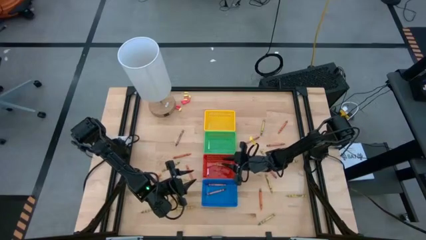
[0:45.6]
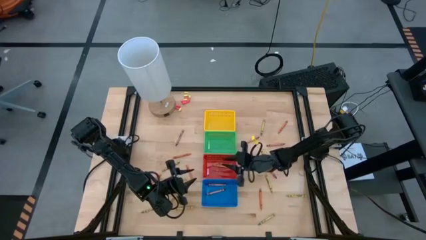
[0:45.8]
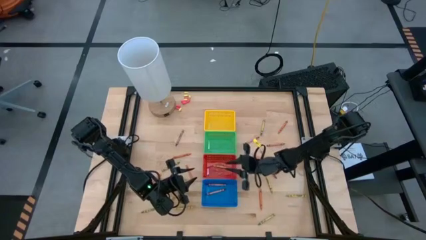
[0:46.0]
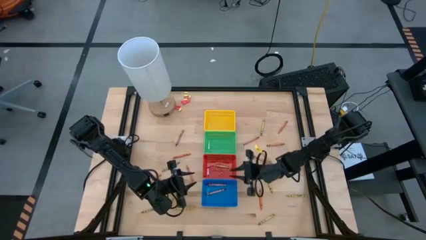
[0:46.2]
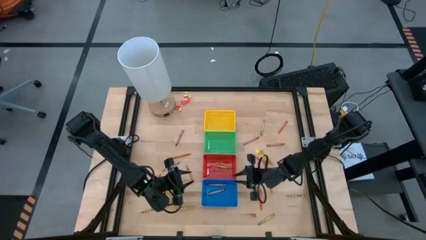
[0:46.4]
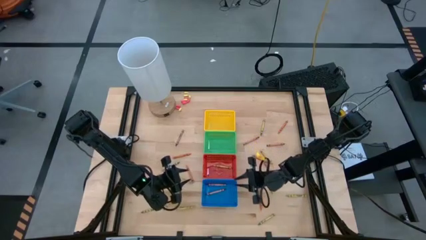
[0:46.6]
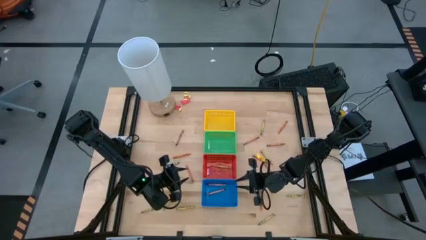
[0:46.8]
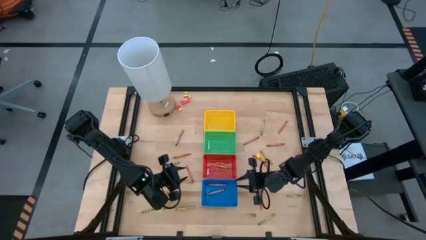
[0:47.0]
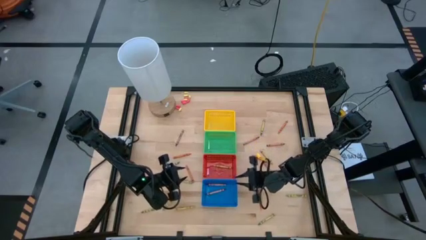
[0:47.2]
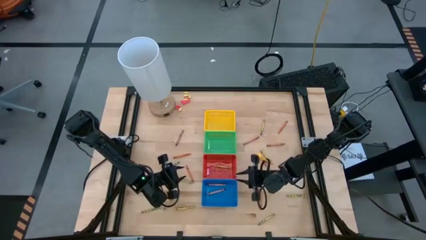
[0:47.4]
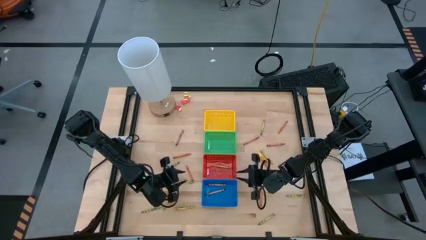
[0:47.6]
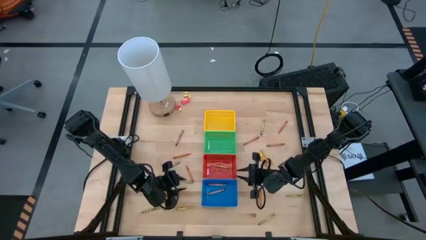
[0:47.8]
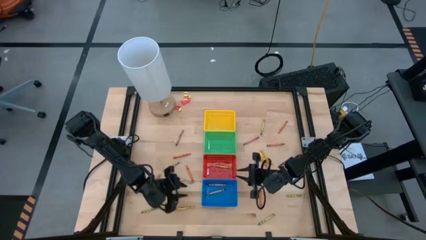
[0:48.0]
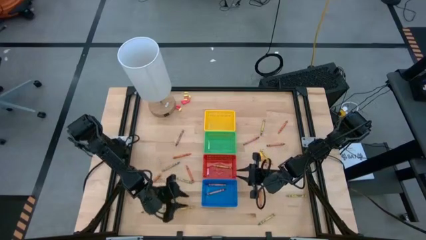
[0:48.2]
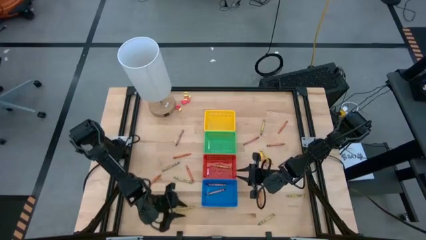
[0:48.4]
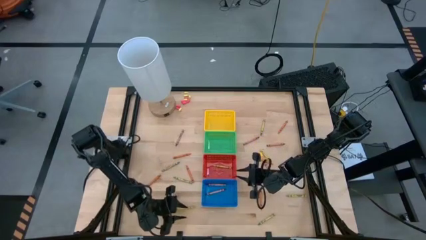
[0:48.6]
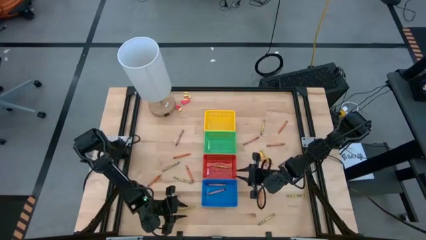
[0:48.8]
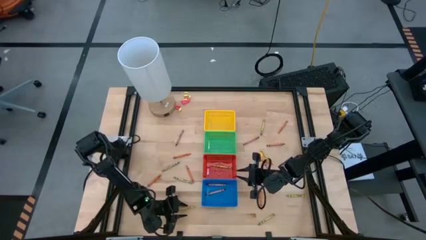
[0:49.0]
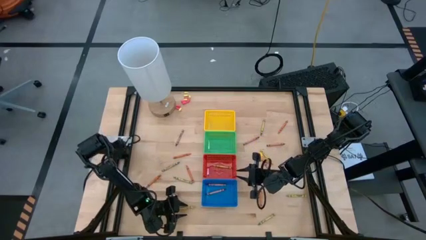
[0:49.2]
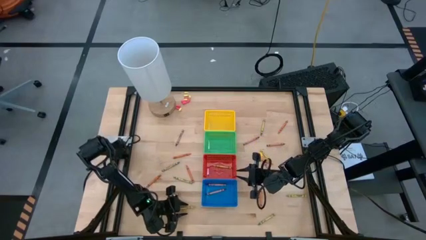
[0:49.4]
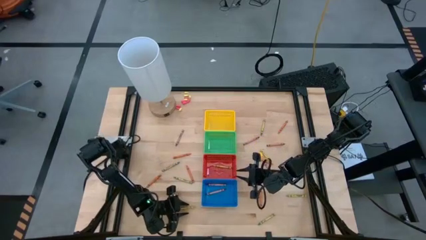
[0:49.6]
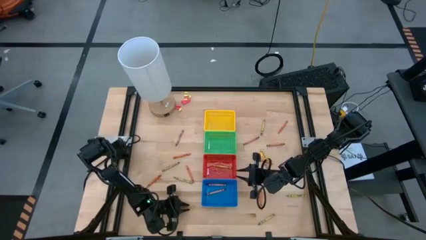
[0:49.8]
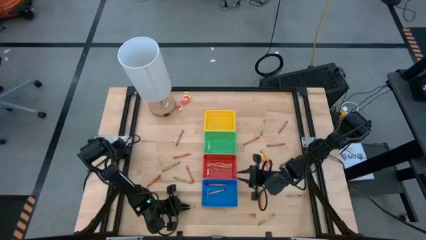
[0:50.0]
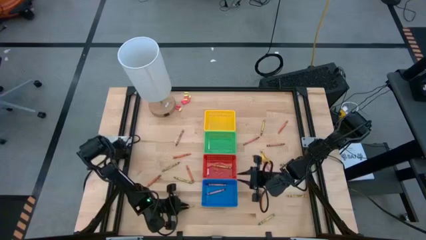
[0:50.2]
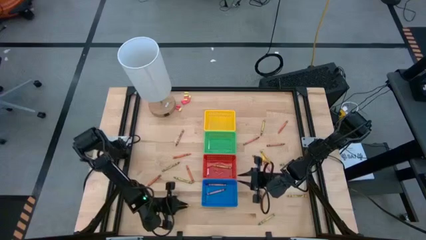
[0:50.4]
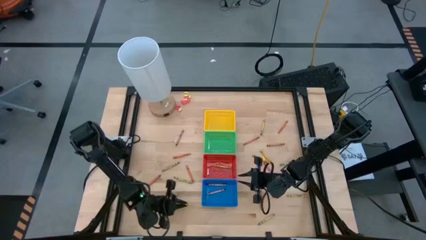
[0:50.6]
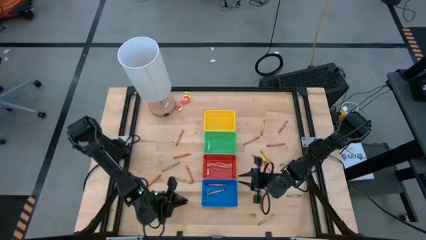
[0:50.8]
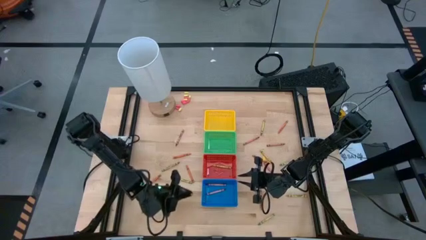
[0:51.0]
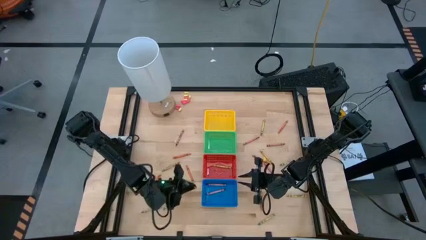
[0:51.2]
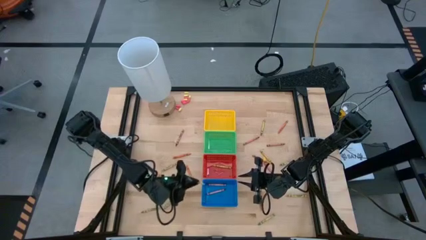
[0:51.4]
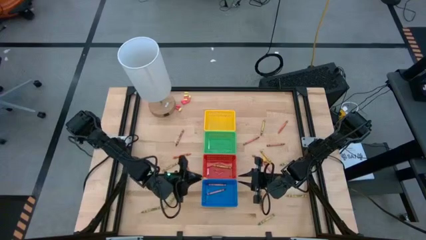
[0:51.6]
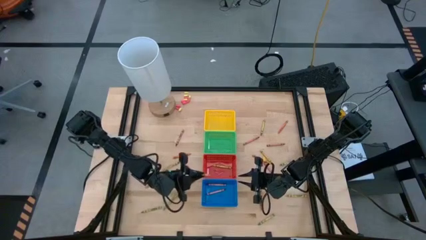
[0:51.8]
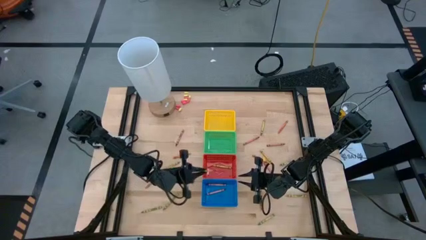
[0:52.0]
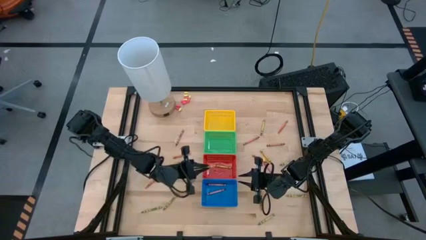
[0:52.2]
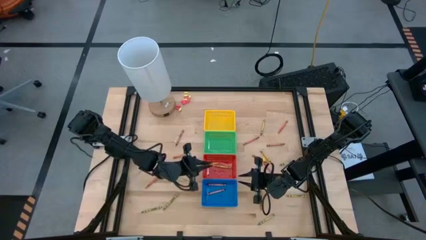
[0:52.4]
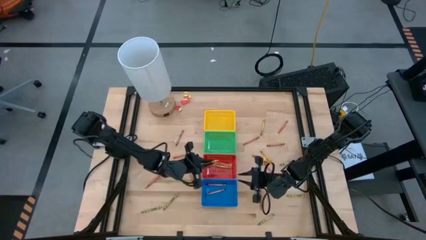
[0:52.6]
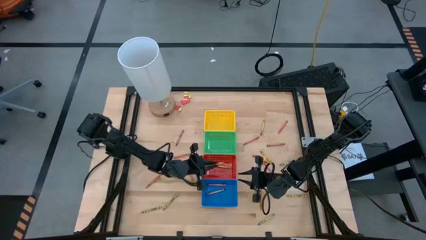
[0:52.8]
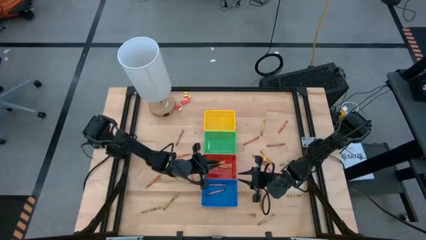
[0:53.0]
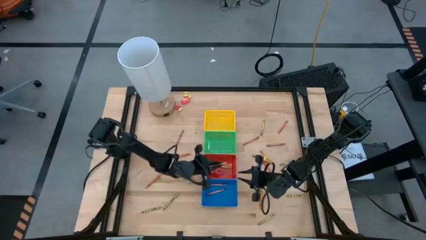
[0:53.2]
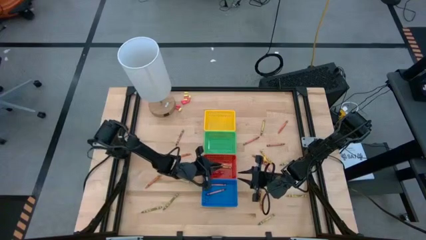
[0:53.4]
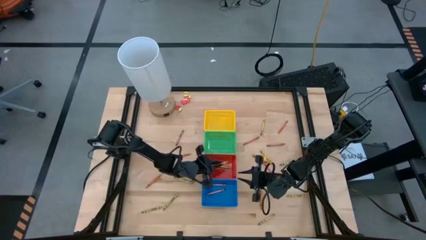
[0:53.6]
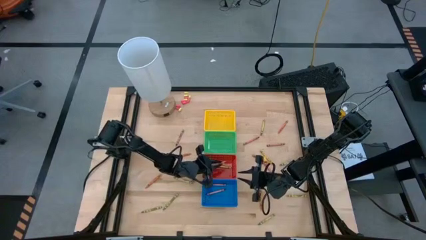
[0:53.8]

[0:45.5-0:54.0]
Task: Sort crayons
Put the yellow crayon into the red bin

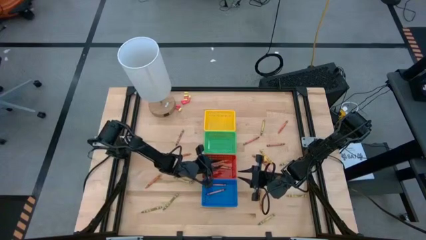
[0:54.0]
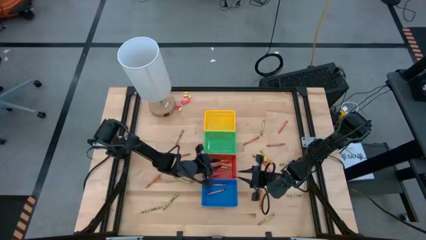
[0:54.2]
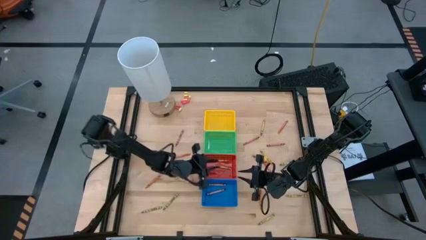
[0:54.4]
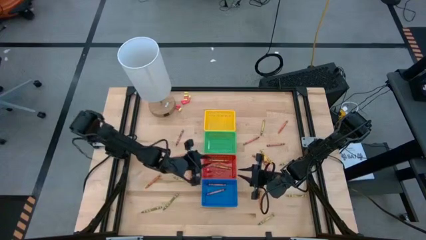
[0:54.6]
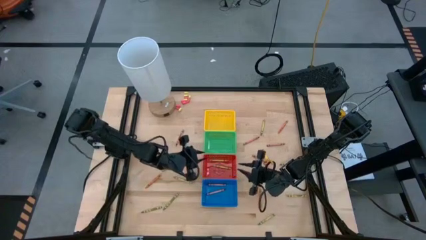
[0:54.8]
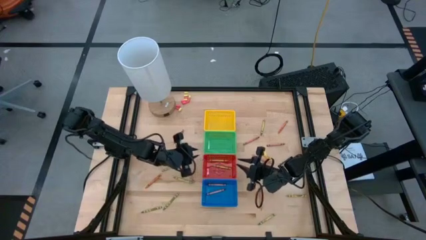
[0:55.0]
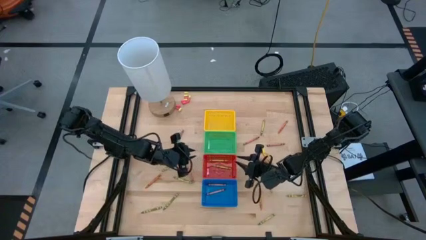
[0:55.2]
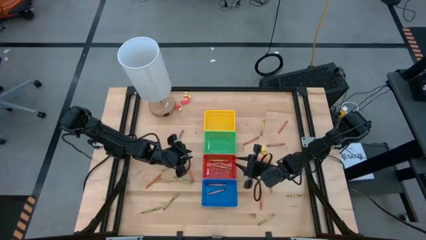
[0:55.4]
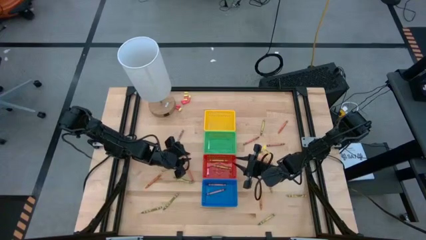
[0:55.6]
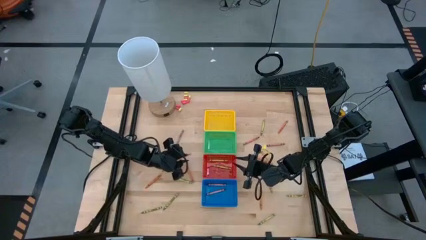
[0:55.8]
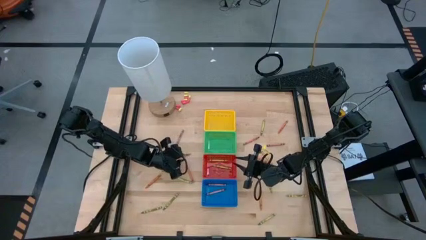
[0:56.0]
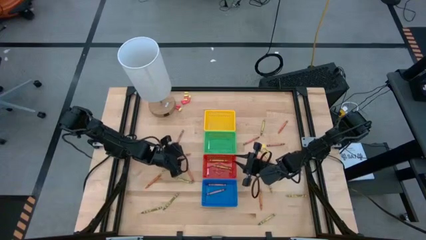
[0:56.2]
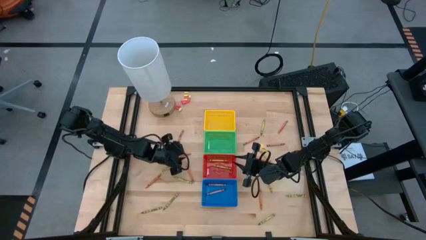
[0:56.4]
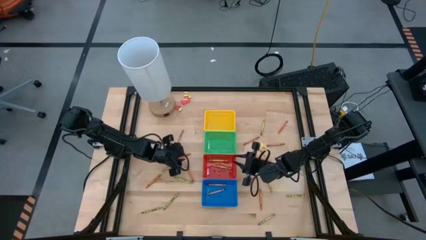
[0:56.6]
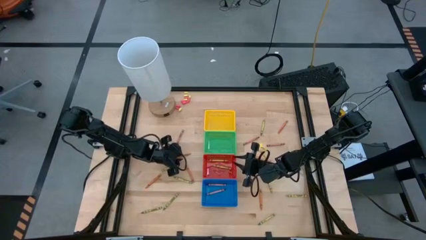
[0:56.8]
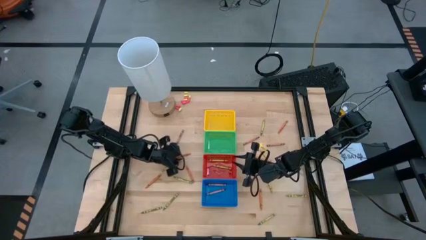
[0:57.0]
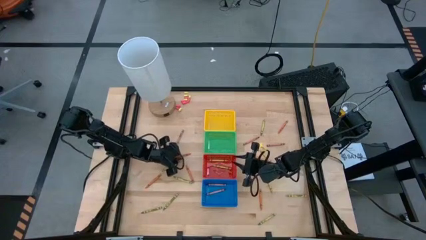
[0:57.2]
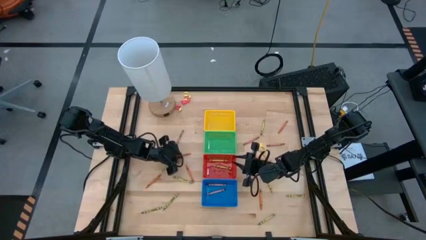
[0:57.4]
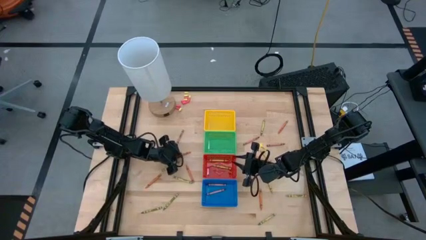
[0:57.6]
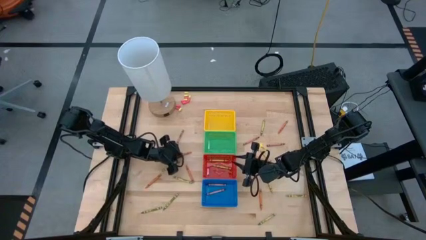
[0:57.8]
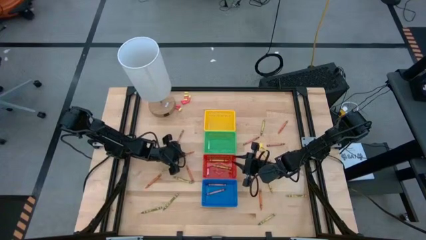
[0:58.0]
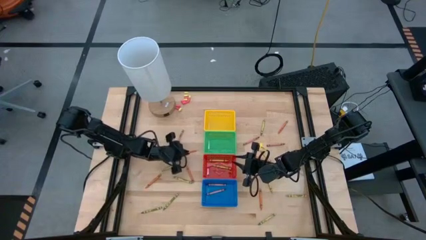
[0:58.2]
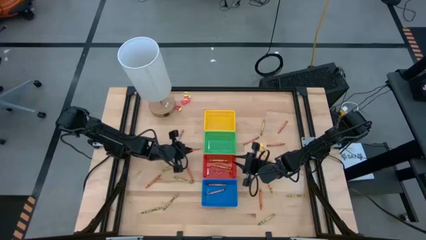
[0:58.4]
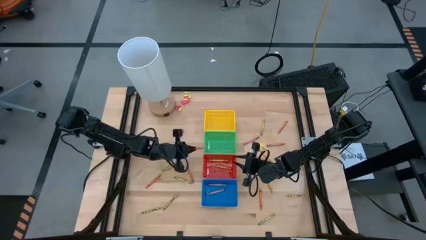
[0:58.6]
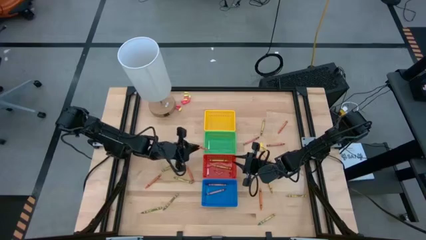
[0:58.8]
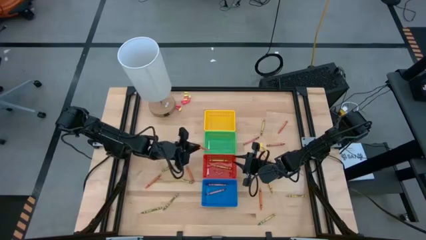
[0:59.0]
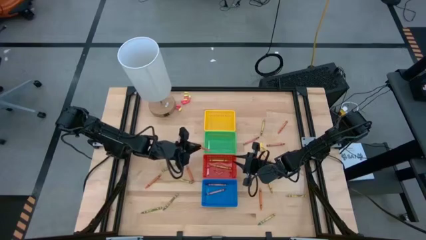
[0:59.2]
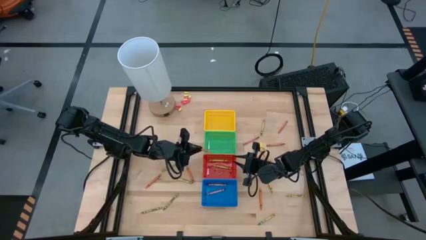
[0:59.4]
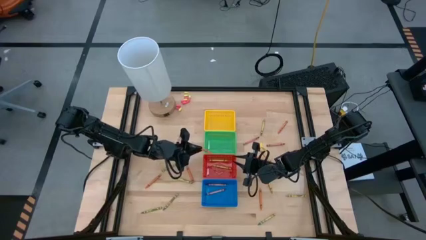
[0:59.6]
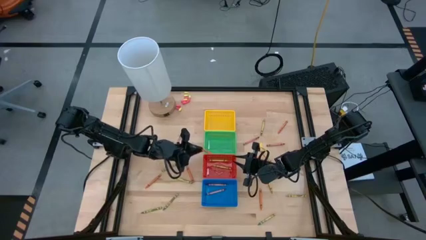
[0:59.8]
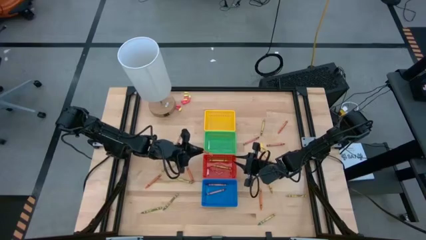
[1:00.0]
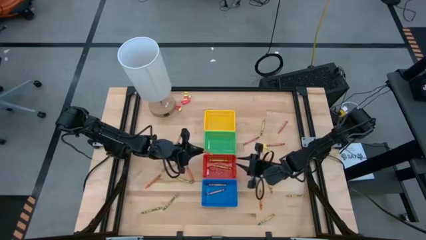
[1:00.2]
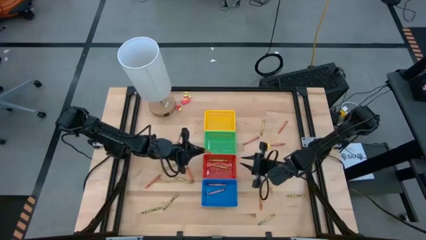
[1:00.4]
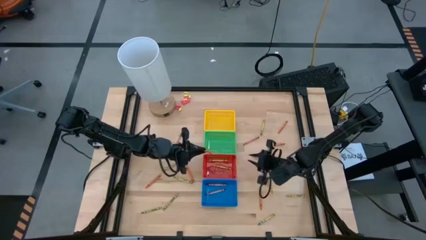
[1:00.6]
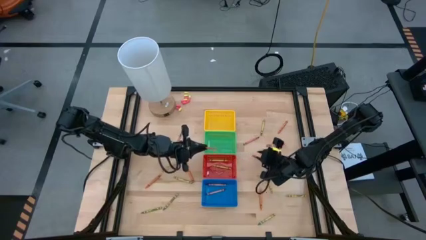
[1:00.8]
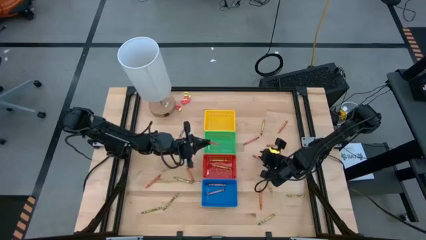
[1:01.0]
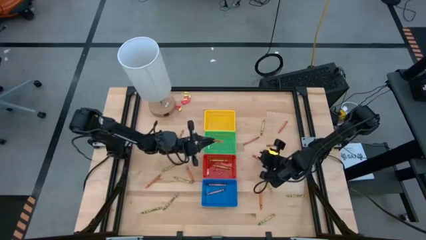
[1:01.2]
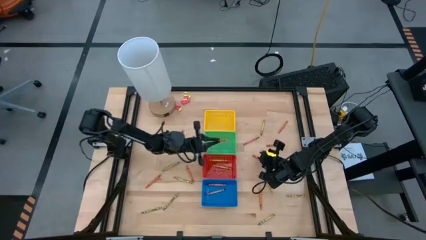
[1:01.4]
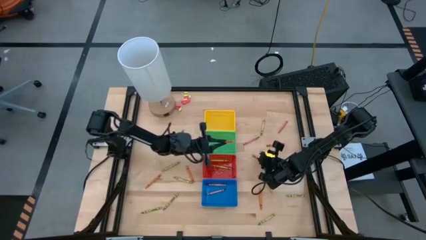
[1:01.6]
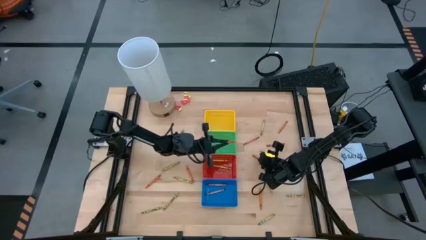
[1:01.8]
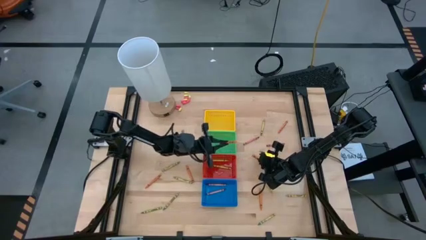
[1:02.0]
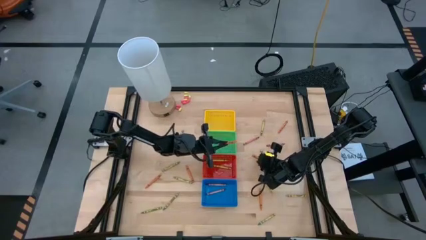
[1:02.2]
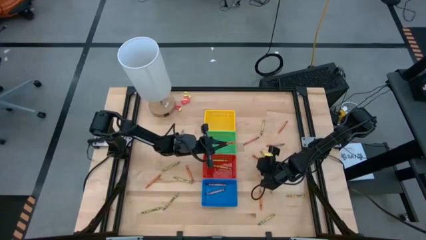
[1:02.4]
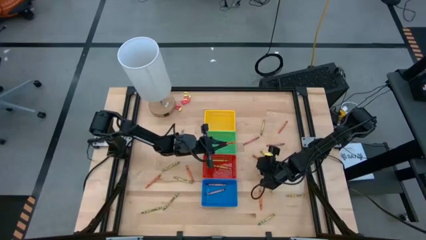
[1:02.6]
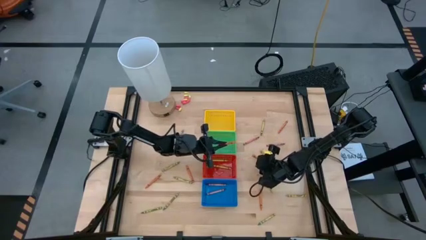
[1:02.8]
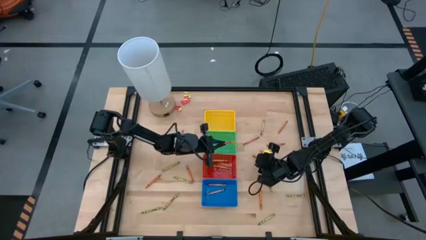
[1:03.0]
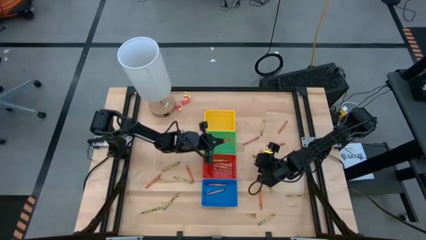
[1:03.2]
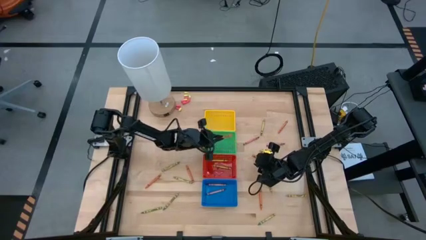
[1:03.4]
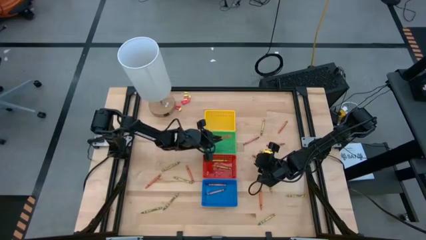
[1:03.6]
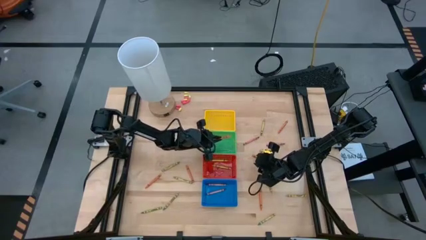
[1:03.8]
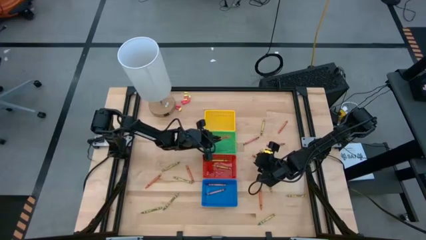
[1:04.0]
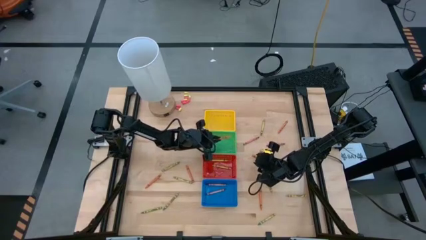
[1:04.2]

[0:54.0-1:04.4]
Put the orange crayon into the green bin
